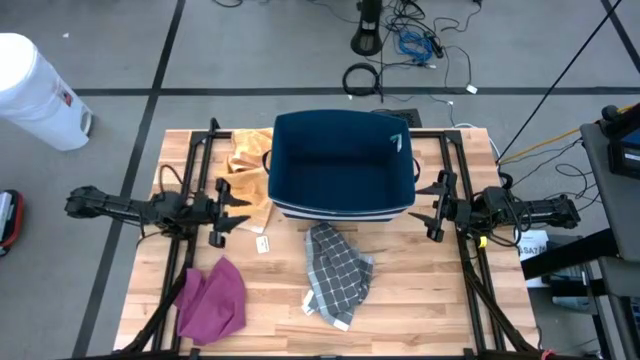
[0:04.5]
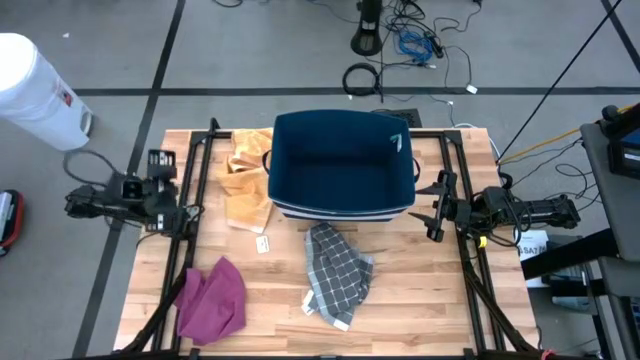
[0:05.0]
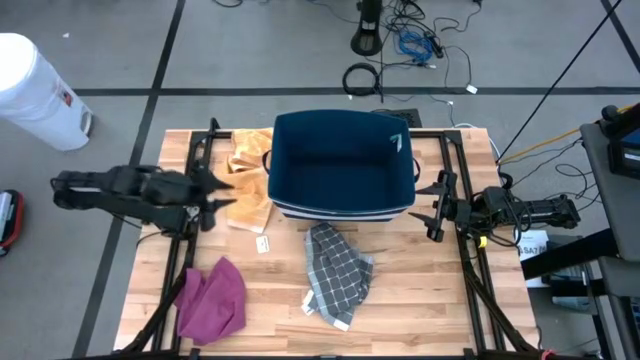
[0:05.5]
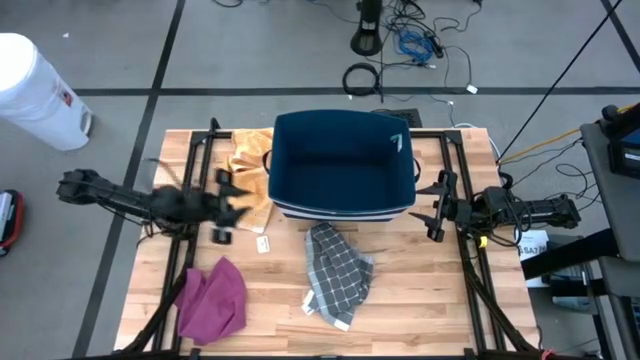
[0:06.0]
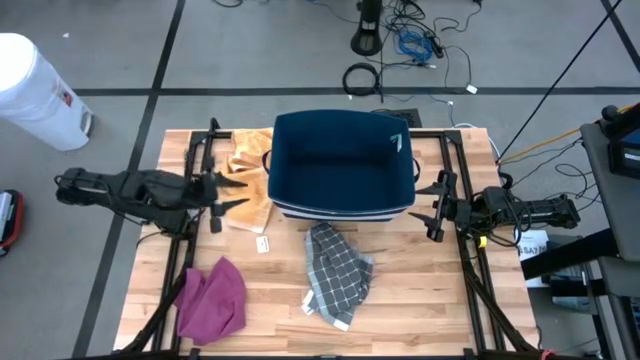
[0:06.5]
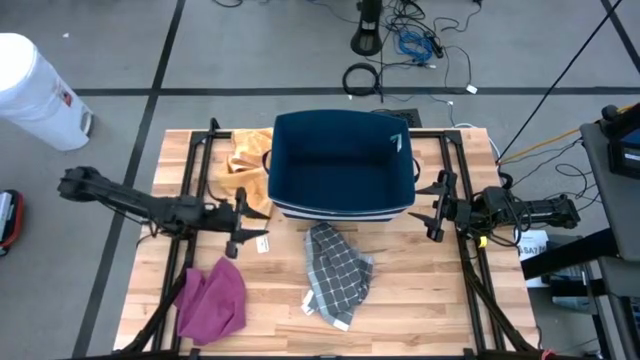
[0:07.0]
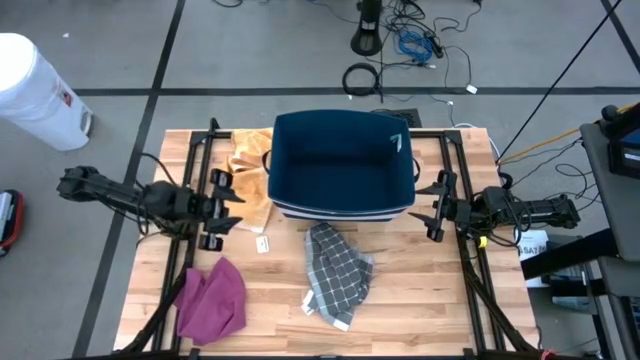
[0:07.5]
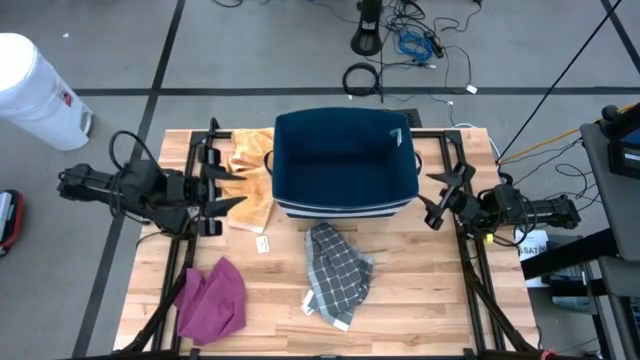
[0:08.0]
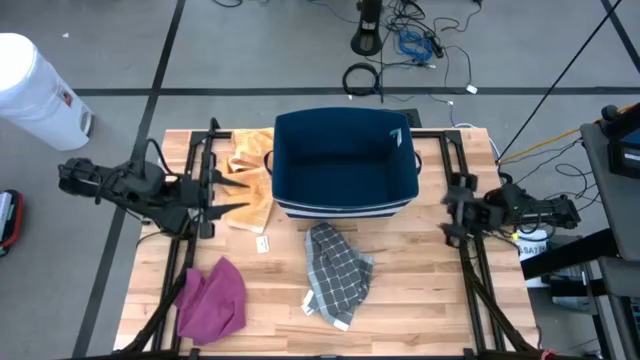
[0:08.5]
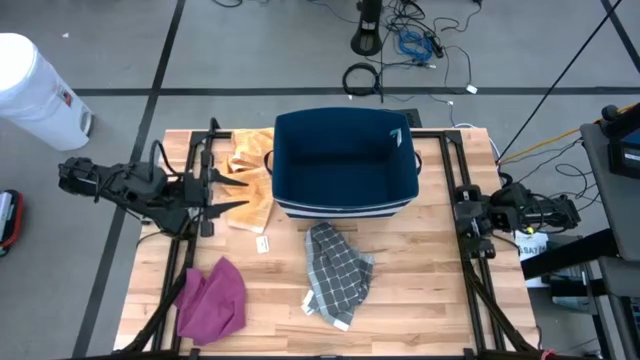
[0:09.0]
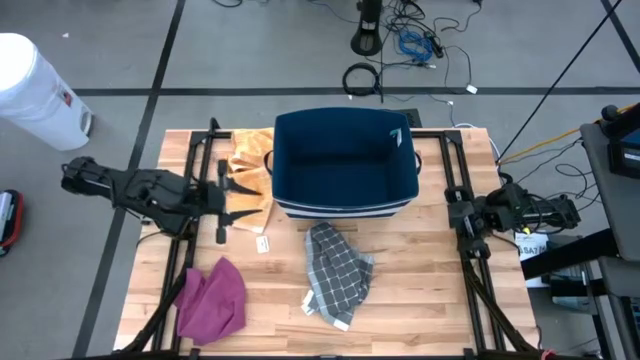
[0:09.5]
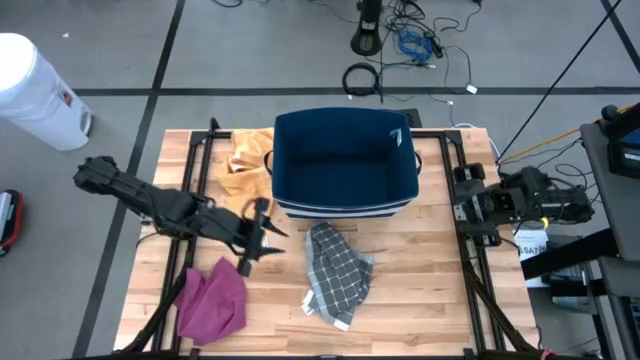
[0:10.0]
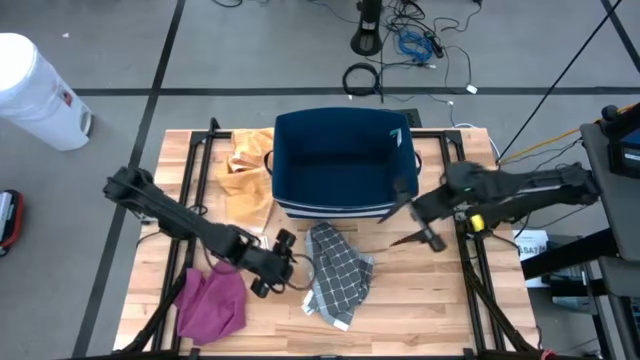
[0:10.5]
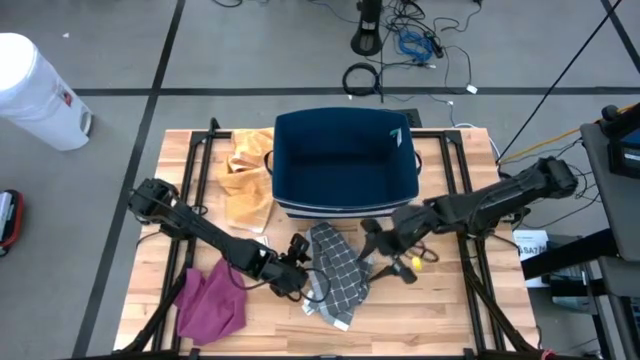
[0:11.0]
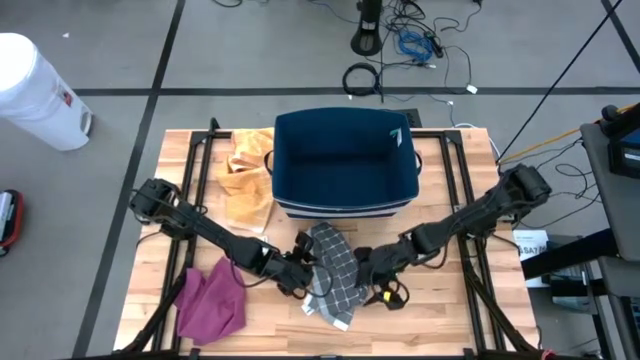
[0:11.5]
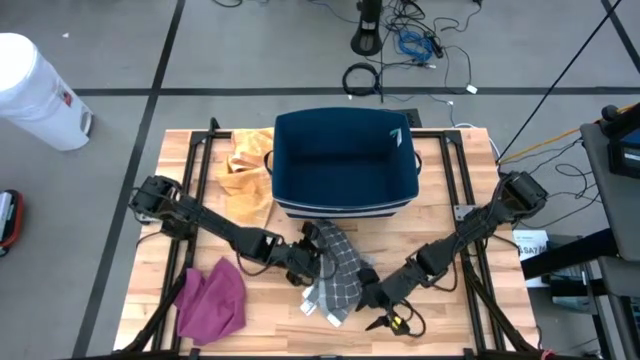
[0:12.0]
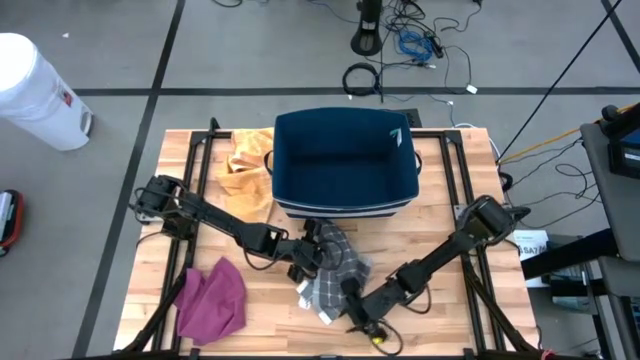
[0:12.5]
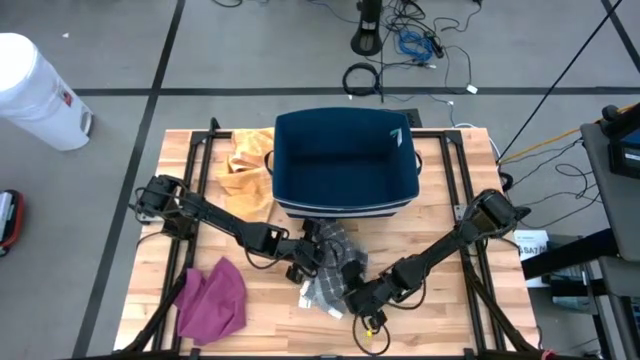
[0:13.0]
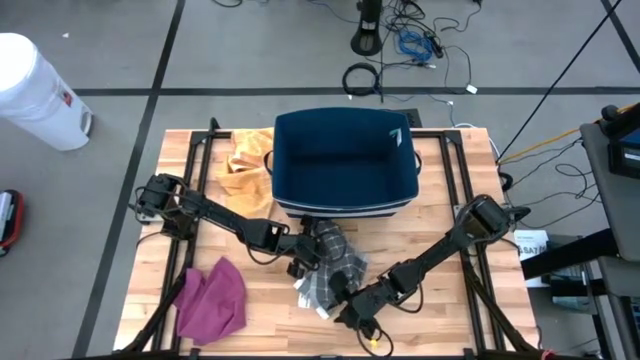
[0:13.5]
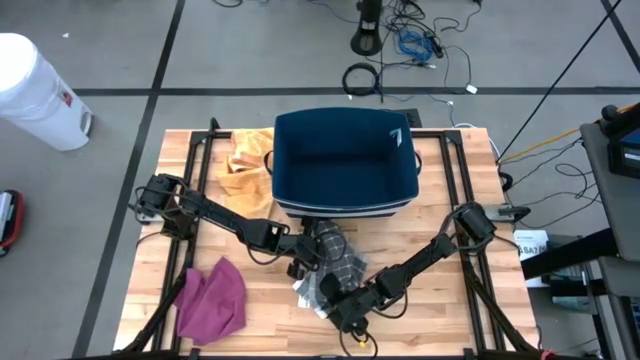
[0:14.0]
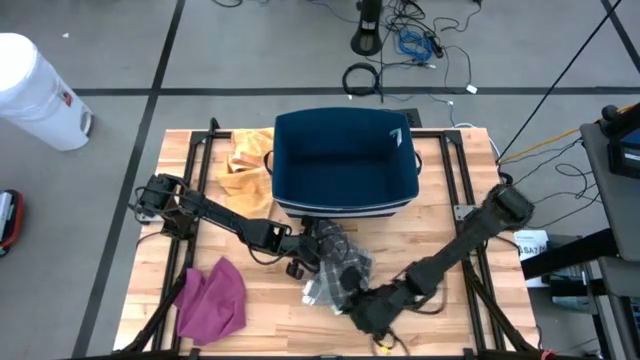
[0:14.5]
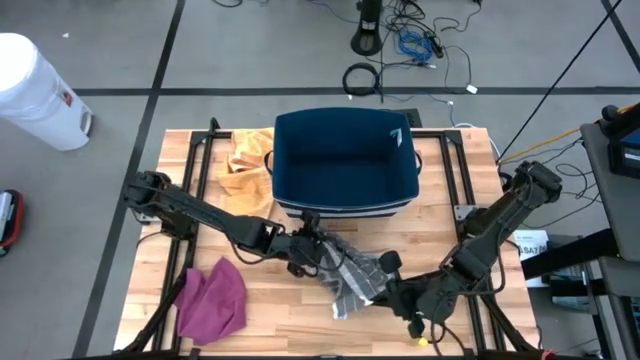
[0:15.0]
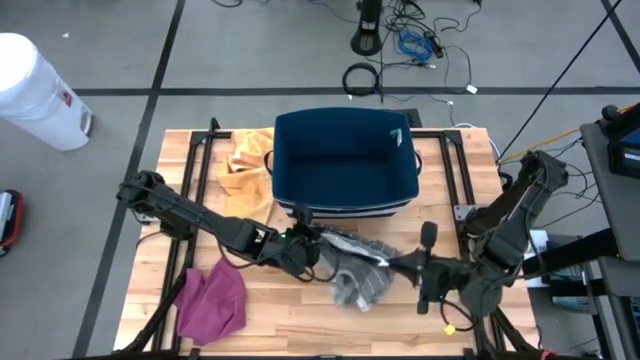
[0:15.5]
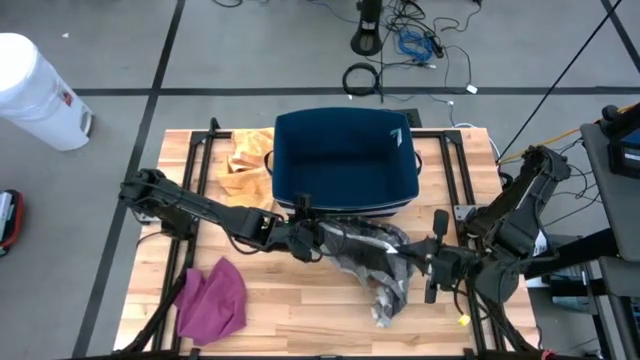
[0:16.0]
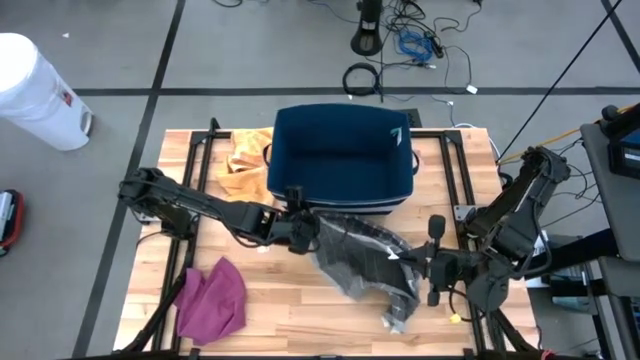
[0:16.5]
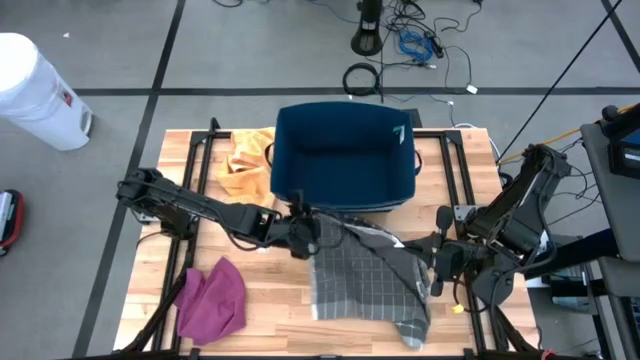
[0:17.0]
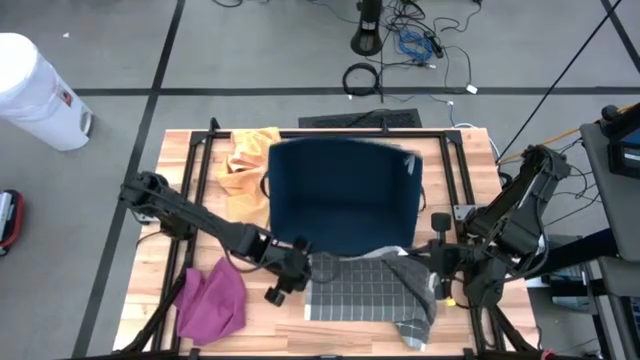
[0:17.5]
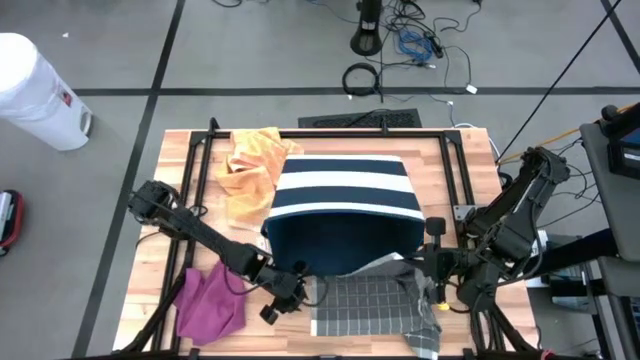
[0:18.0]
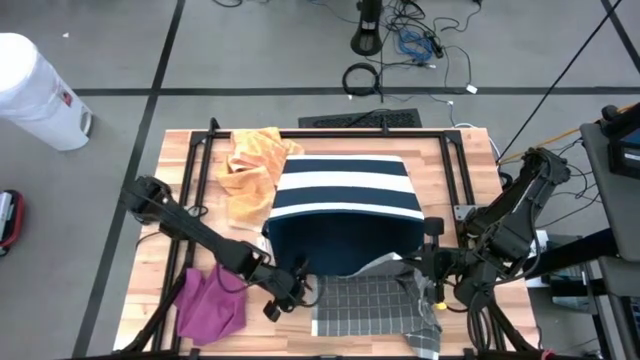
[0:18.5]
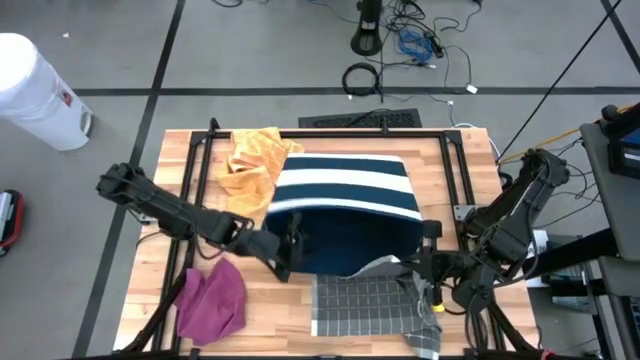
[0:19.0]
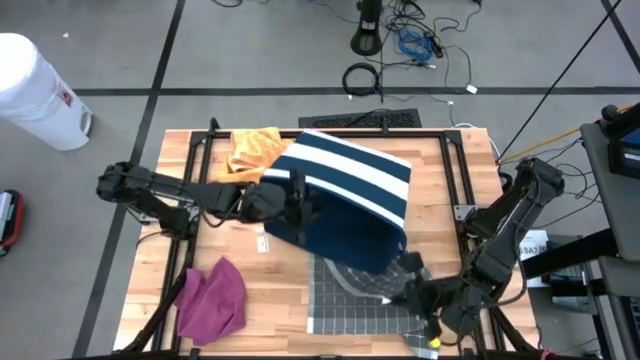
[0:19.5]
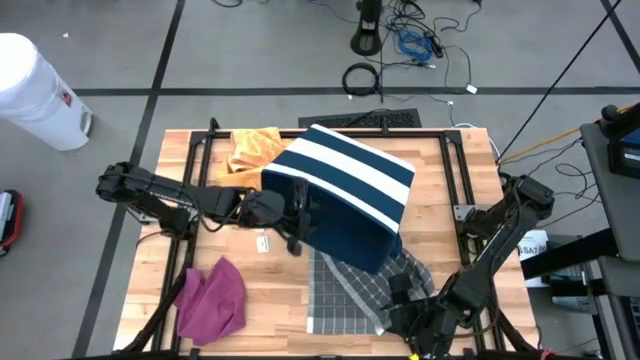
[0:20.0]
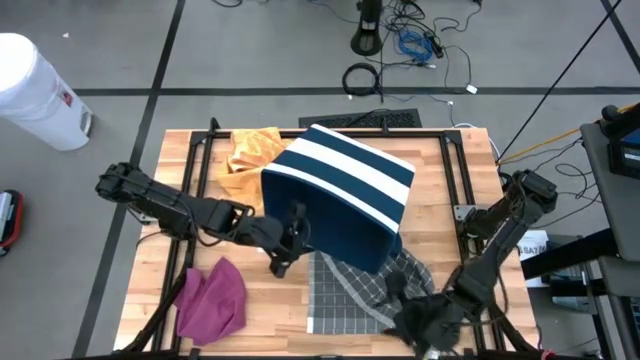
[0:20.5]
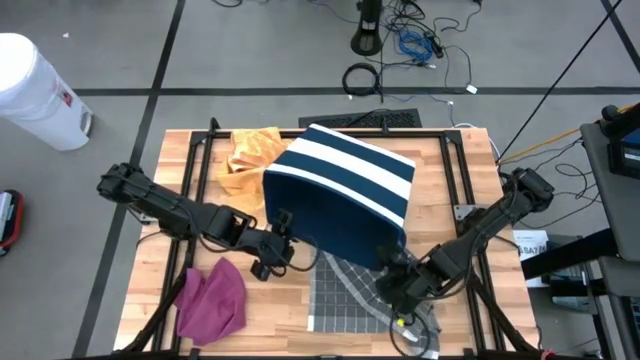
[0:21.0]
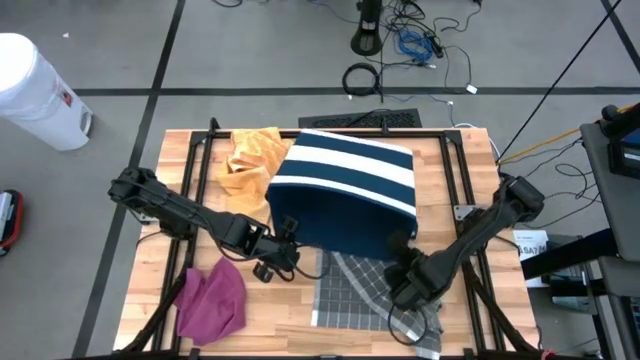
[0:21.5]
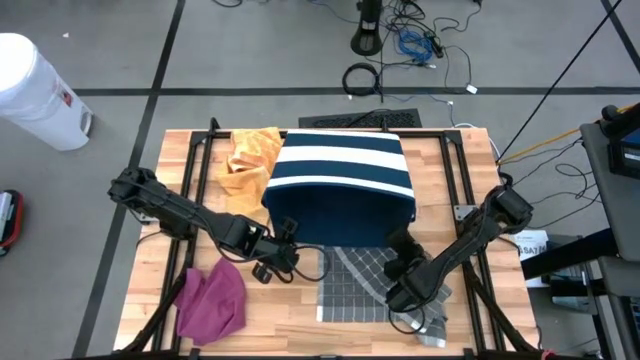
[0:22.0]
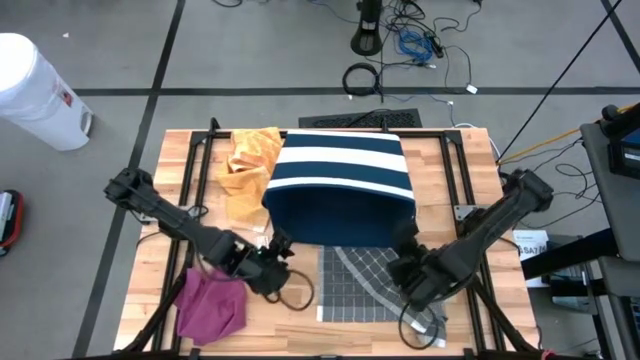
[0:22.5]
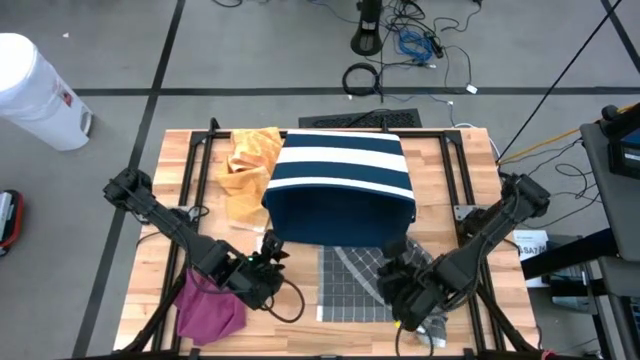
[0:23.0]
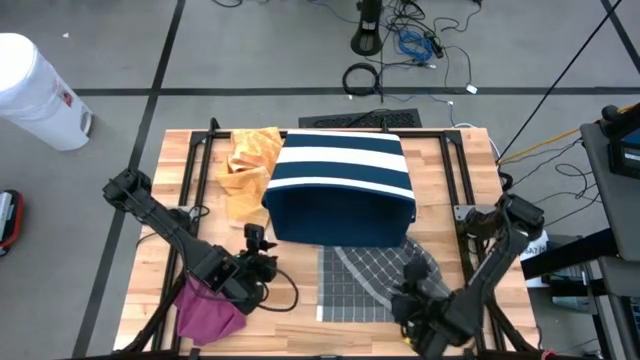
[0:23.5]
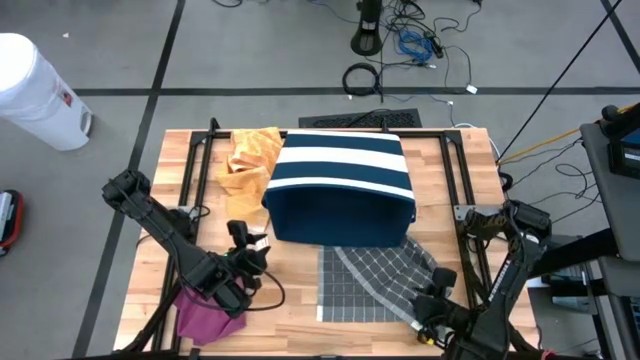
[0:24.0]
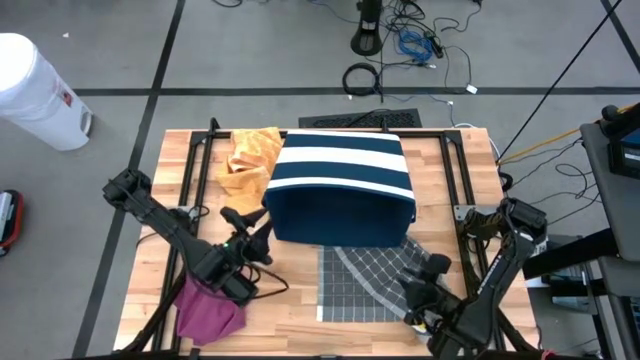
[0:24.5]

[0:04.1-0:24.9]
Task: Fold towel
Fold the gray patterned towel
